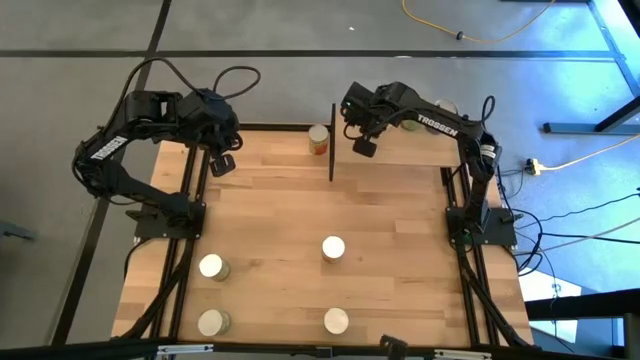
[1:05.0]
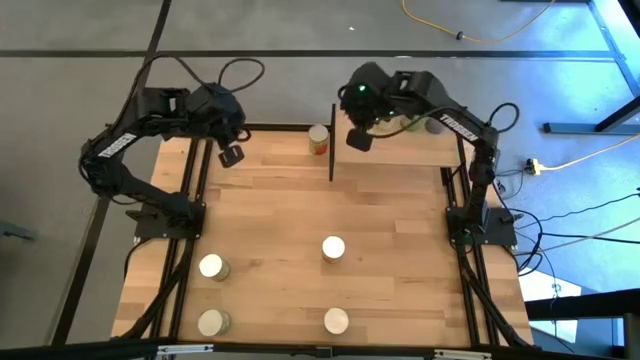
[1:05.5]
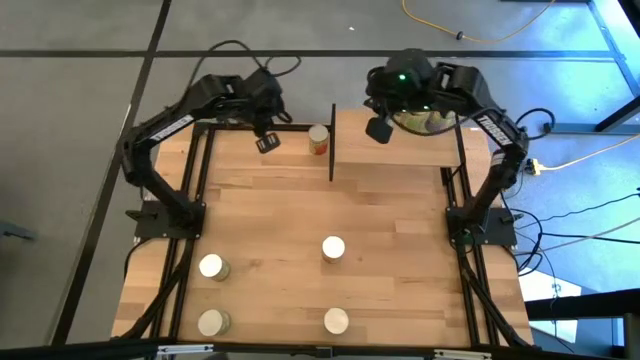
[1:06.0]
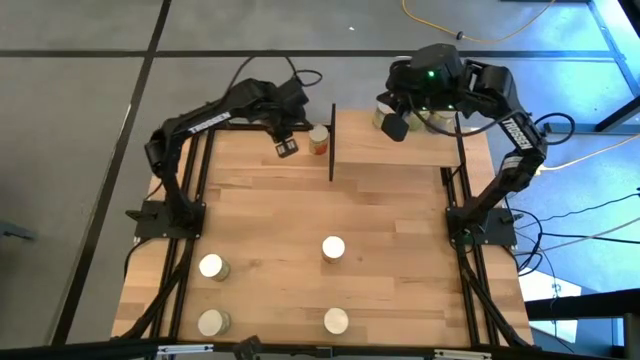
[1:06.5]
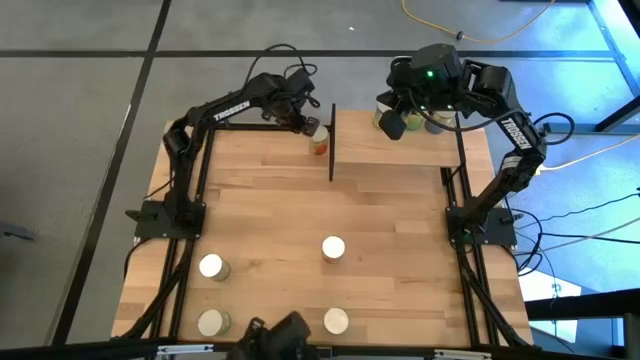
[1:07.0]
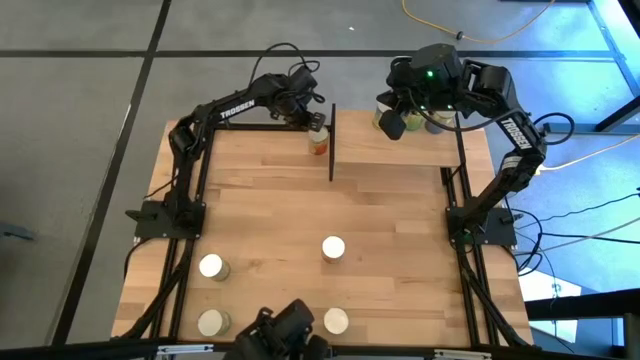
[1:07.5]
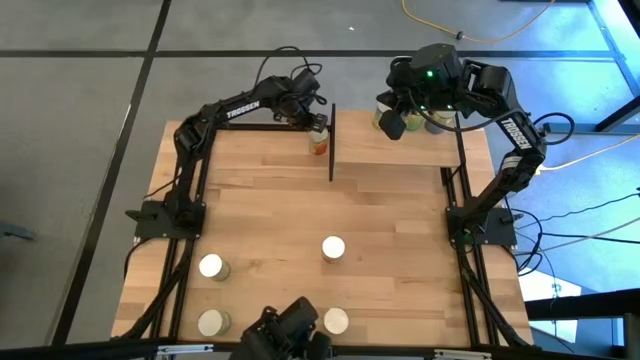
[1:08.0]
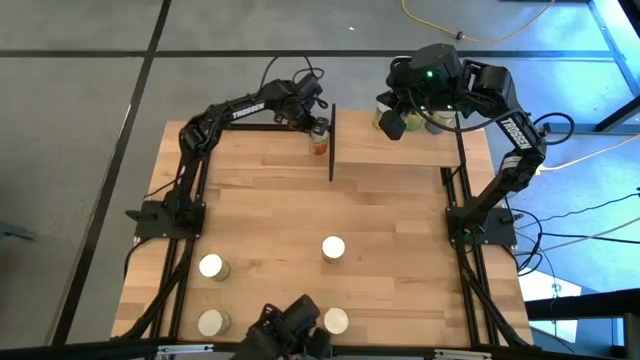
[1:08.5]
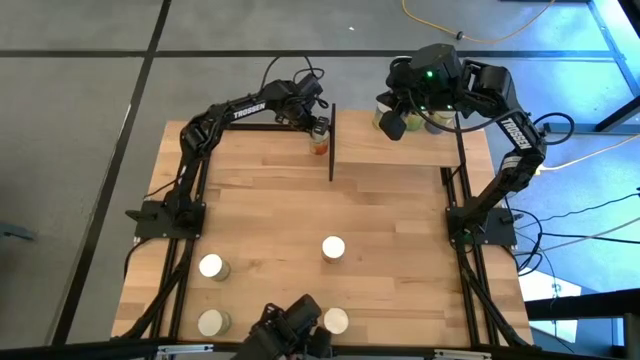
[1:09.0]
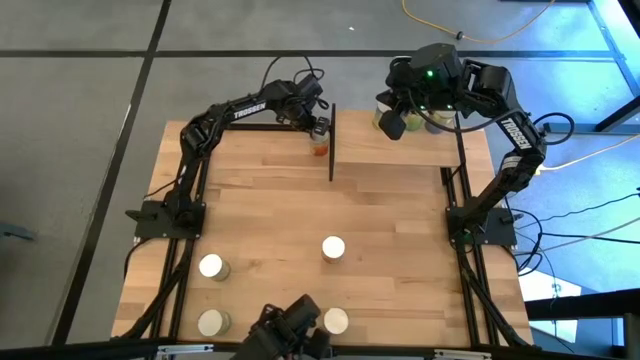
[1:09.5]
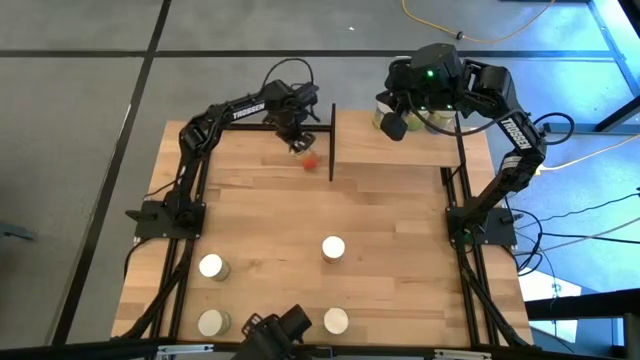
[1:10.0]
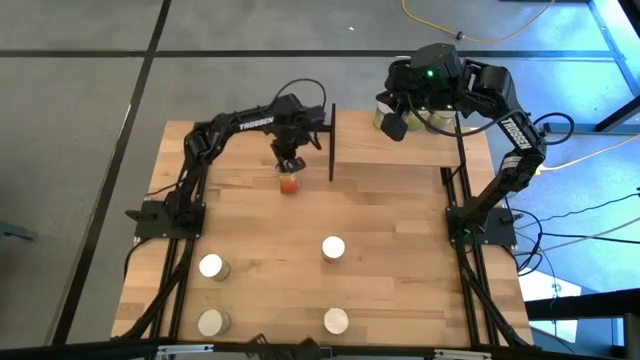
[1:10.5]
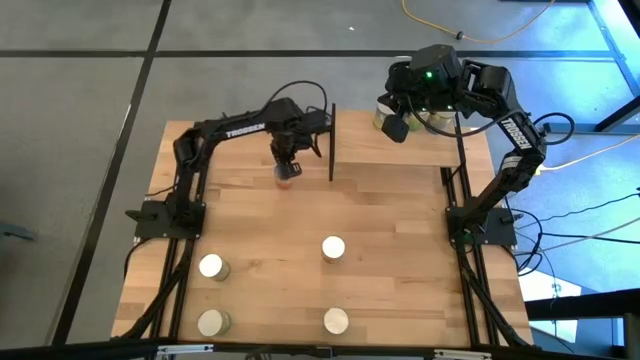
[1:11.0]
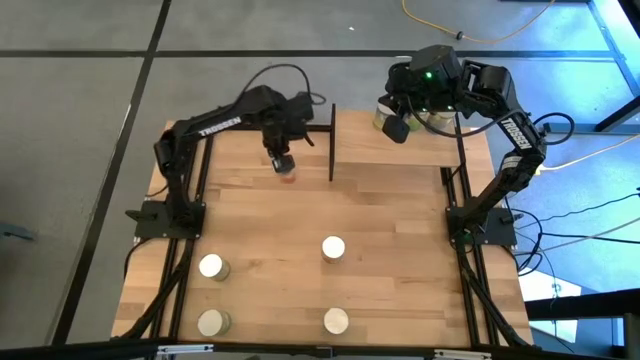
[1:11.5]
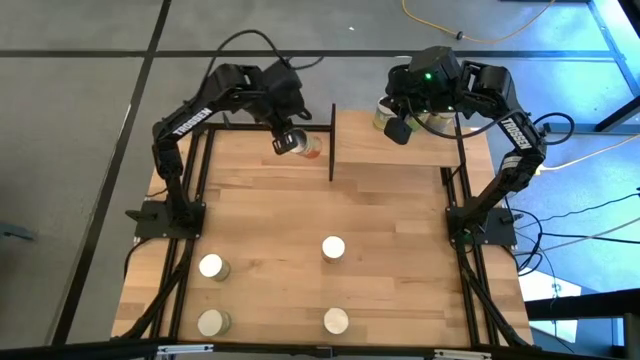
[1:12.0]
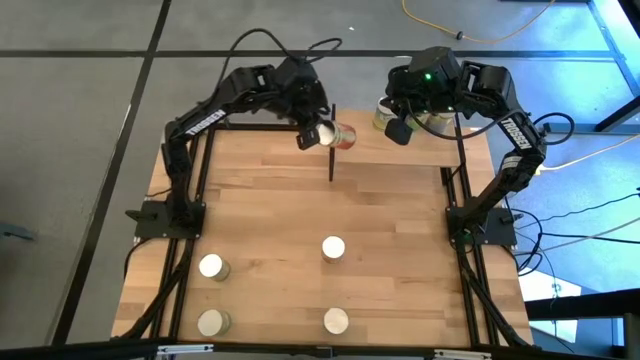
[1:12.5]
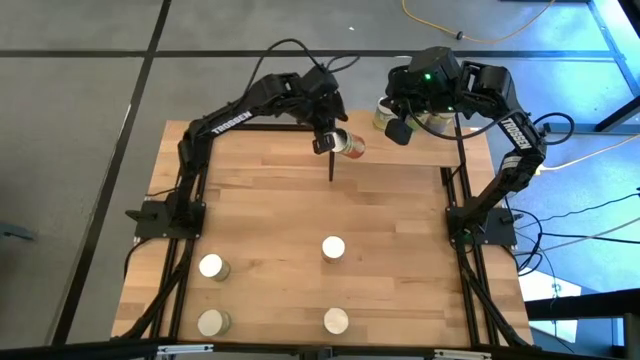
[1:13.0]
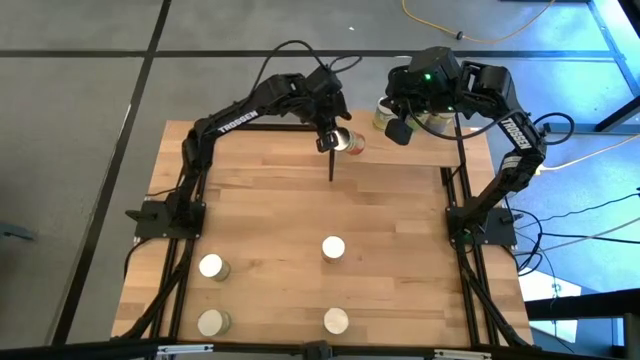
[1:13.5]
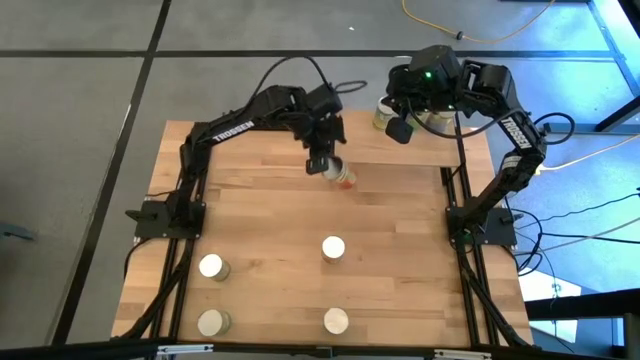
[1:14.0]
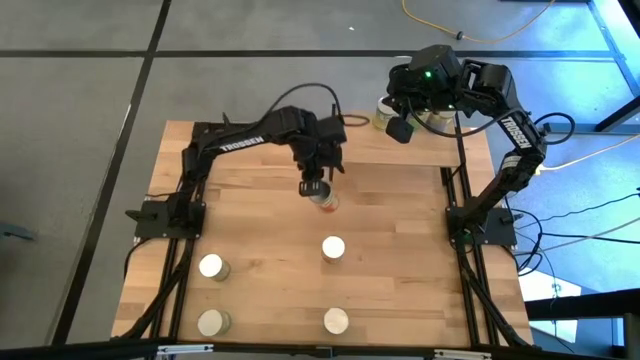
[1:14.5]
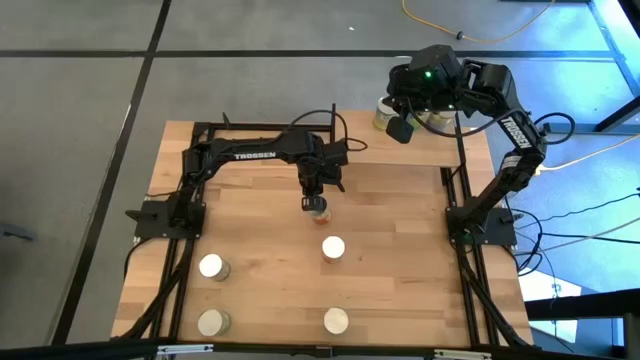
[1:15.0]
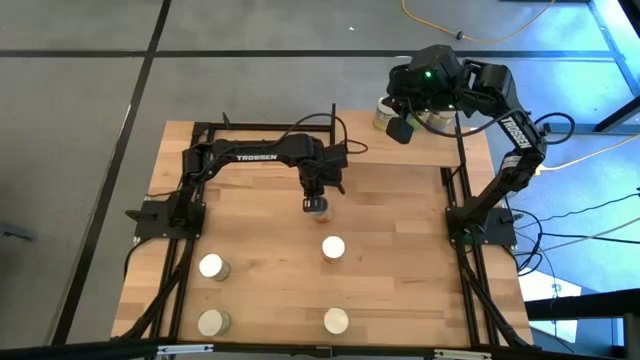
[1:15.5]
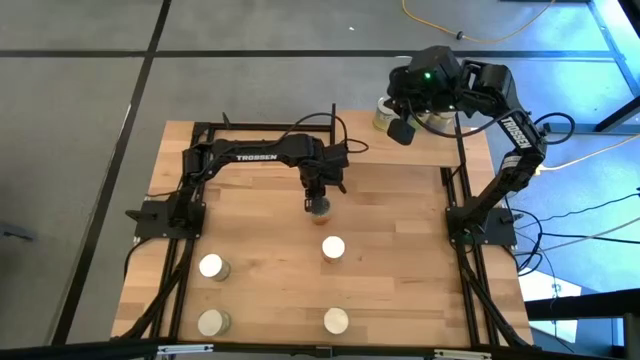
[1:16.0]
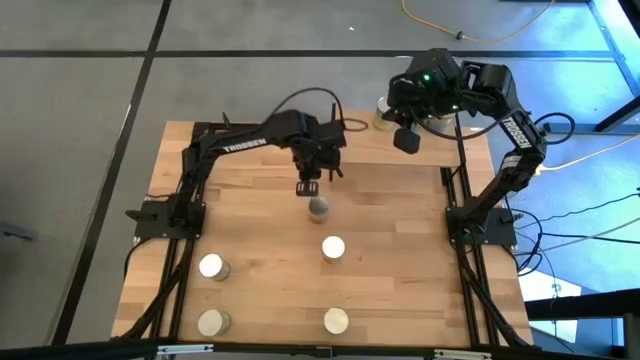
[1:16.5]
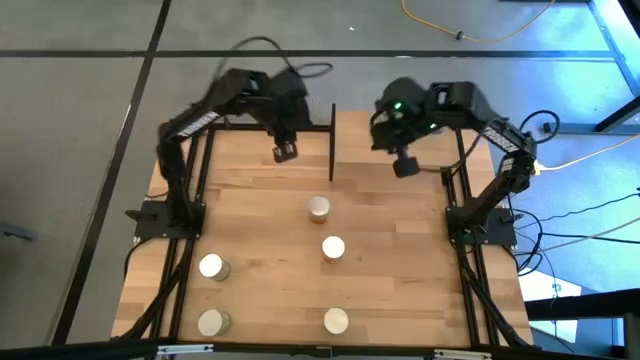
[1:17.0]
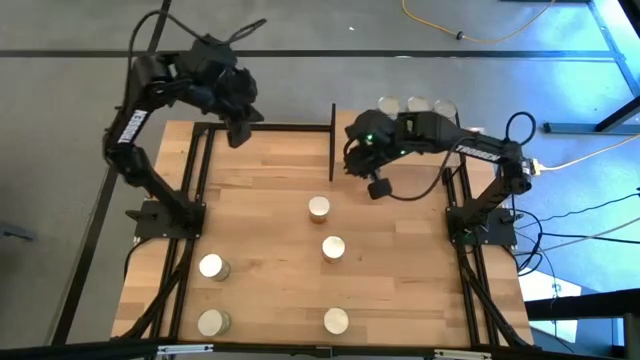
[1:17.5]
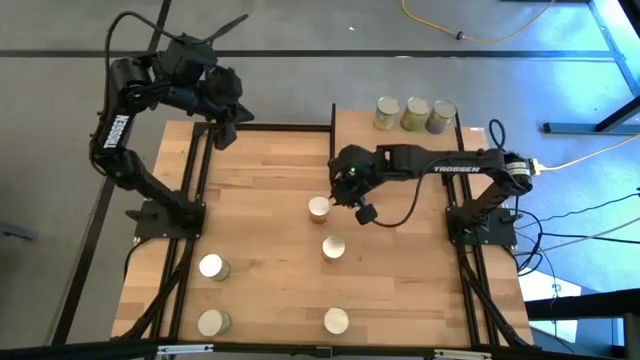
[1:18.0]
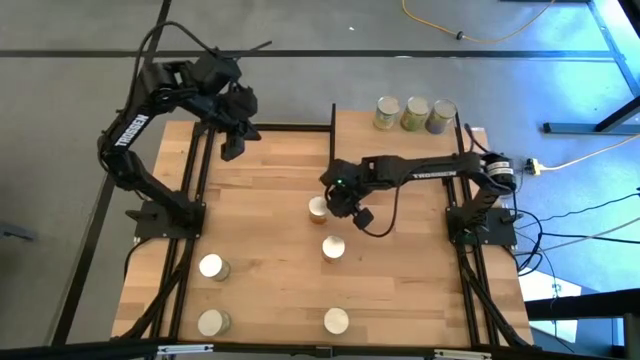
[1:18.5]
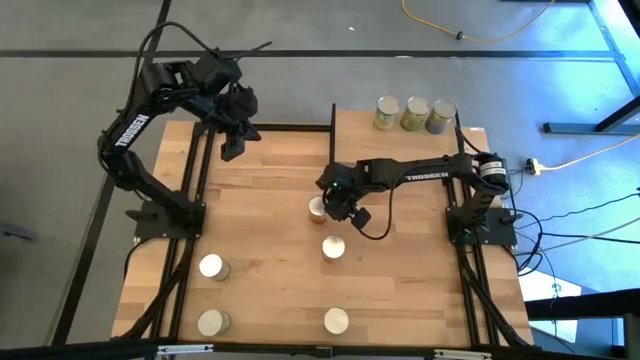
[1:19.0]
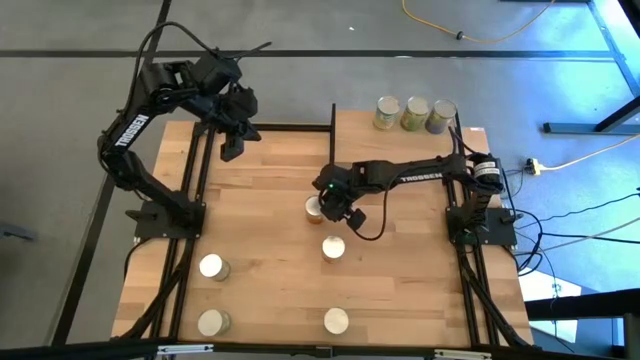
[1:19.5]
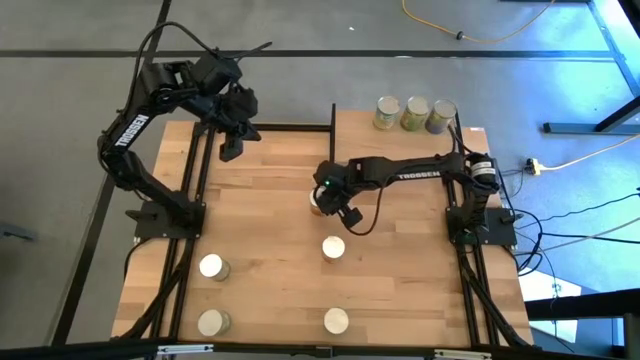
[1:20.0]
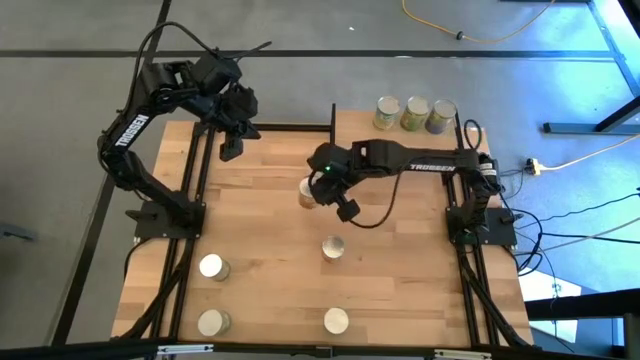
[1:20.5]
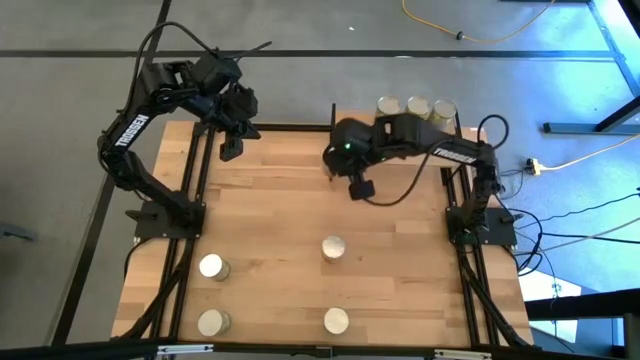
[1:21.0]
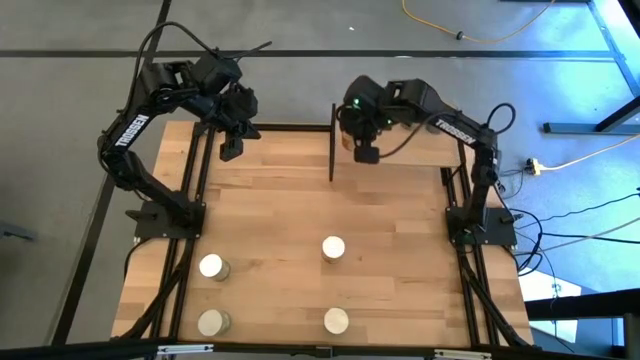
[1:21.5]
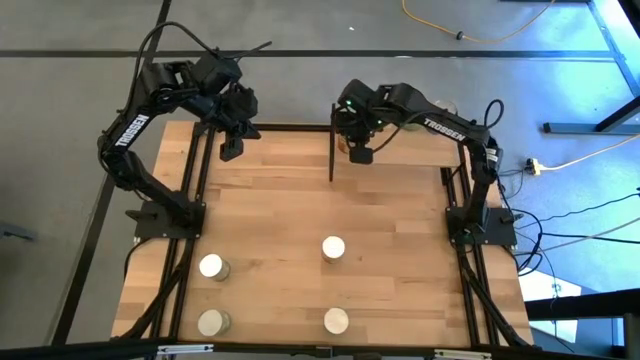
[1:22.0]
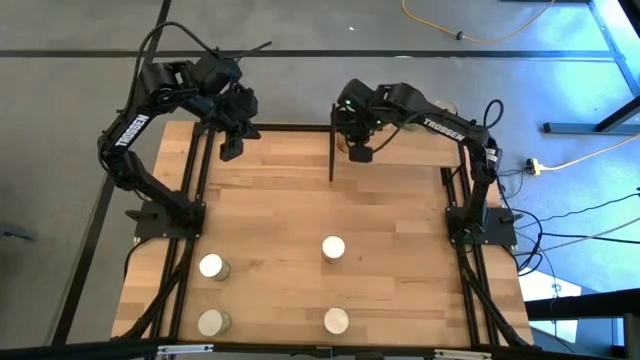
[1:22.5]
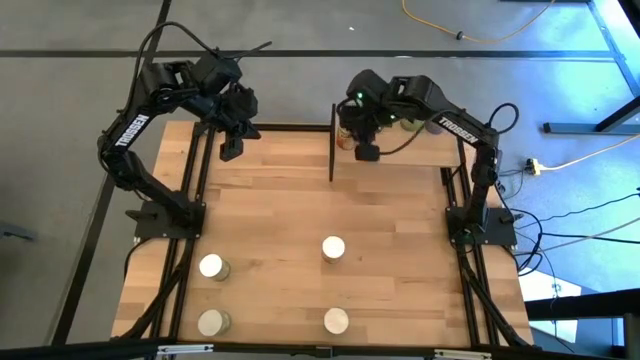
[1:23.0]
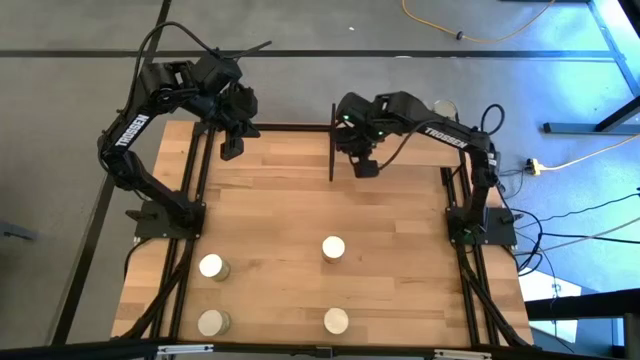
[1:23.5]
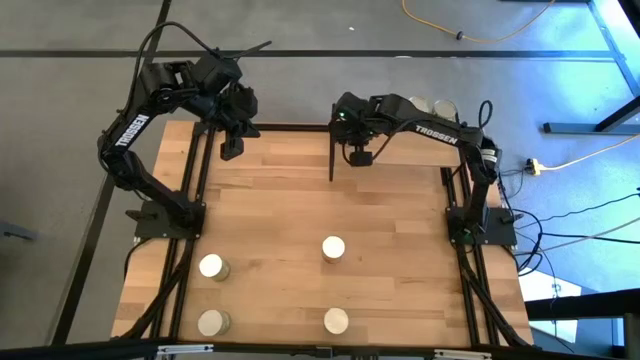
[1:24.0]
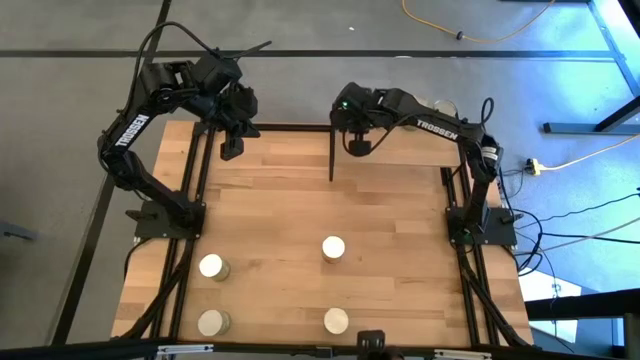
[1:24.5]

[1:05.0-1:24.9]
Task: Pick and place cans onto a shelf
Put the top canned pineapple on the shelf

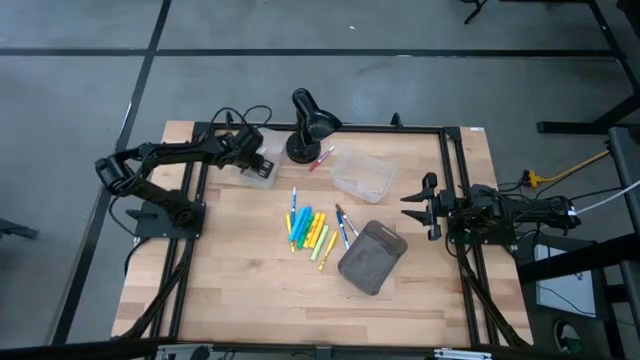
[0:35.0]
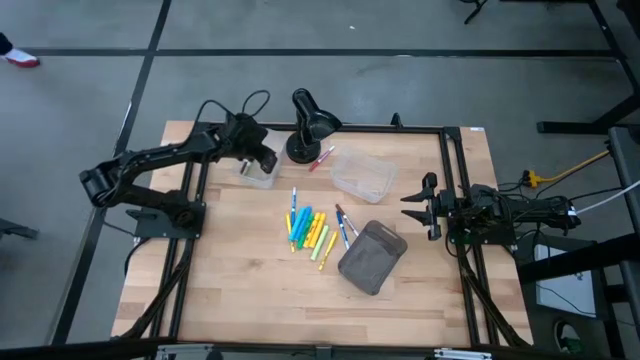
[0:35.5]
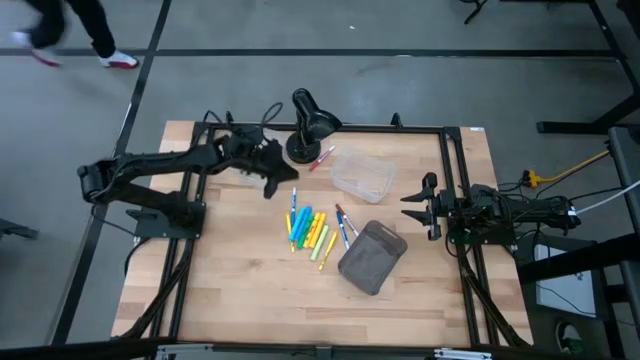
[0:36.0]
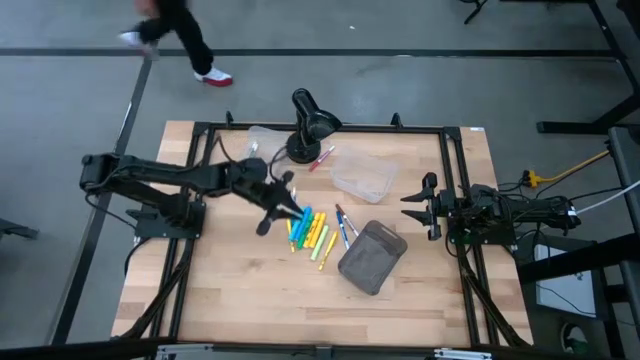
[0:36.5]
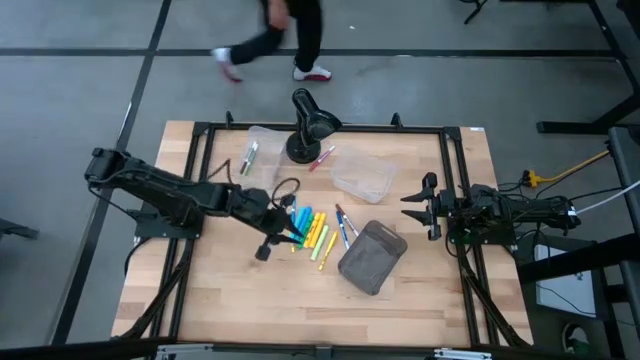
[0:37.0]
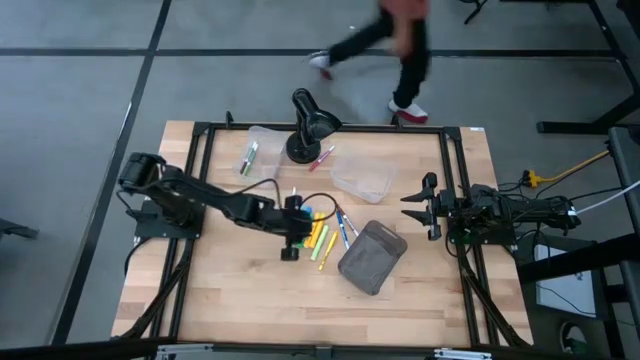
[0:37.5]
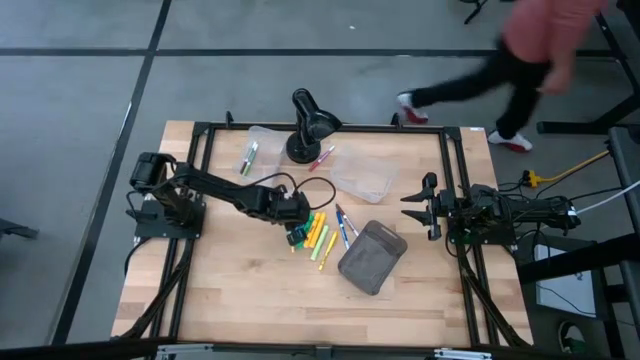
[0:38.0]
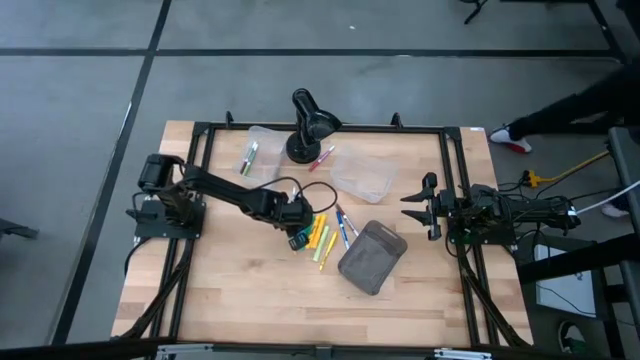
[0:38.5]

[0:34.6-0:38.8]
Task: Pick & Place Markers
Put the light blue highlighter pen into the right transparent bin
